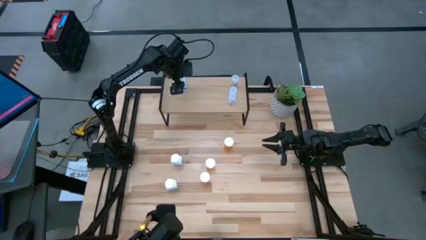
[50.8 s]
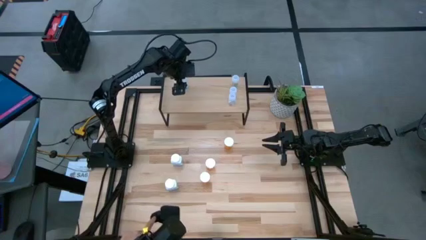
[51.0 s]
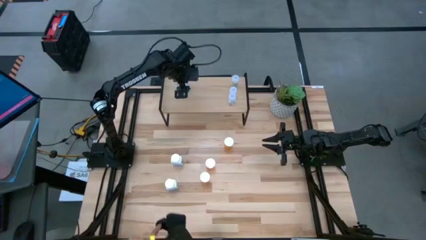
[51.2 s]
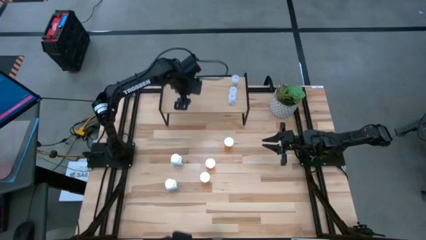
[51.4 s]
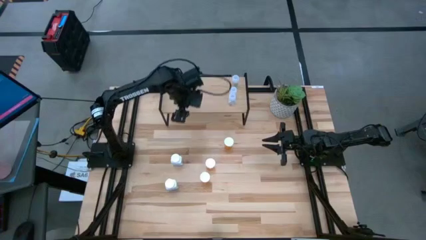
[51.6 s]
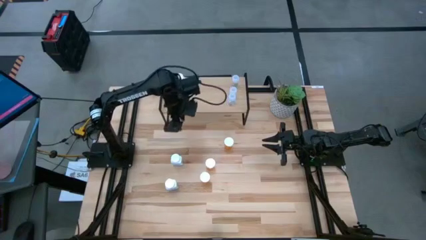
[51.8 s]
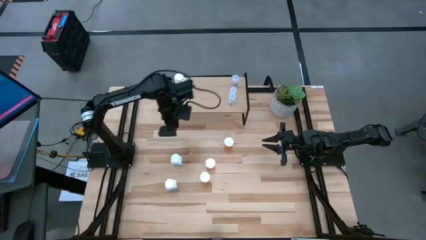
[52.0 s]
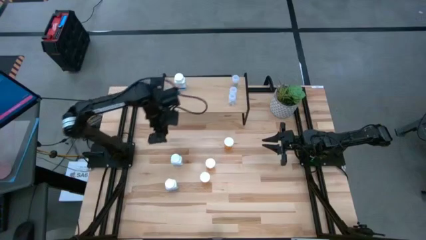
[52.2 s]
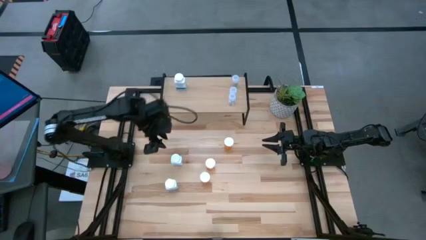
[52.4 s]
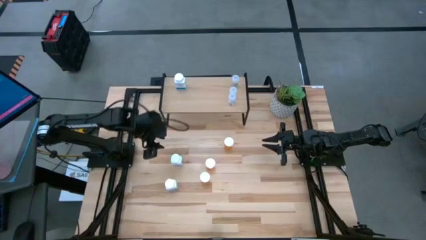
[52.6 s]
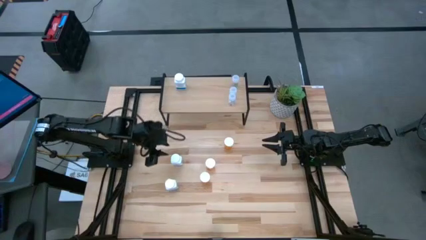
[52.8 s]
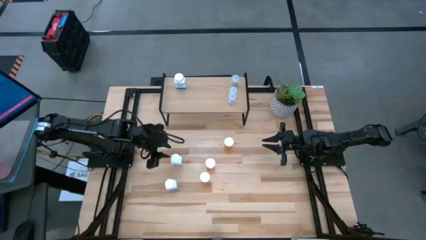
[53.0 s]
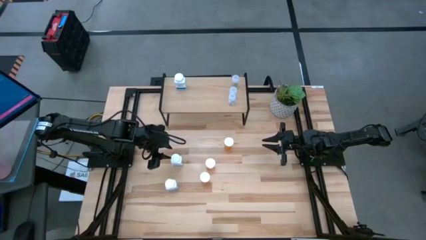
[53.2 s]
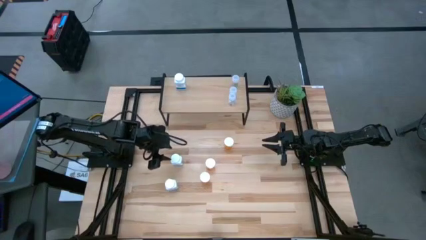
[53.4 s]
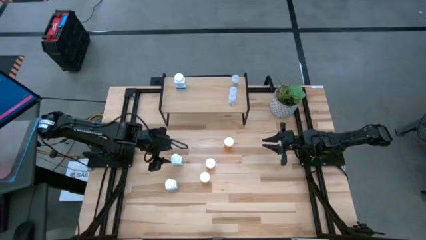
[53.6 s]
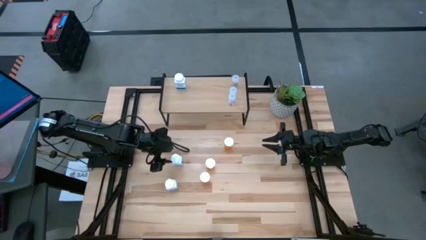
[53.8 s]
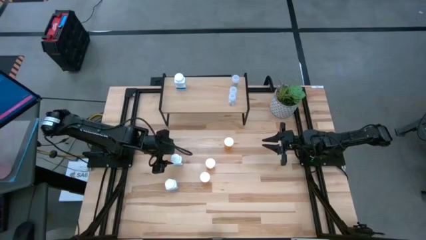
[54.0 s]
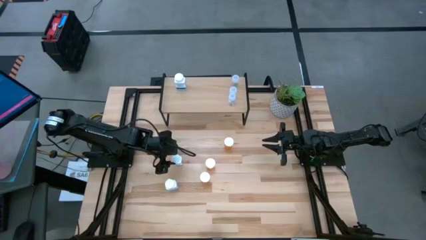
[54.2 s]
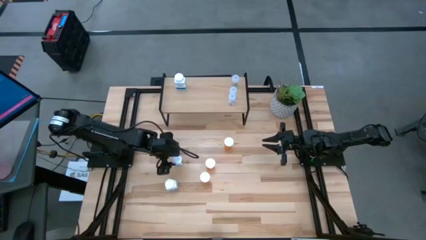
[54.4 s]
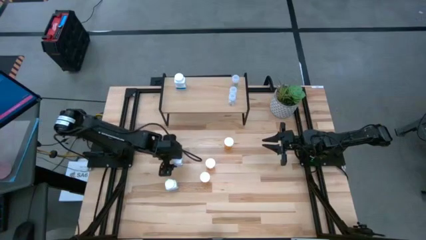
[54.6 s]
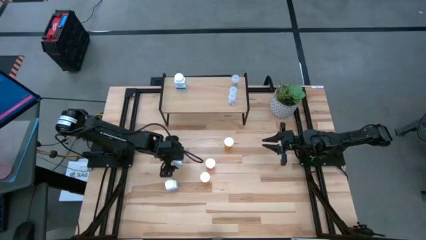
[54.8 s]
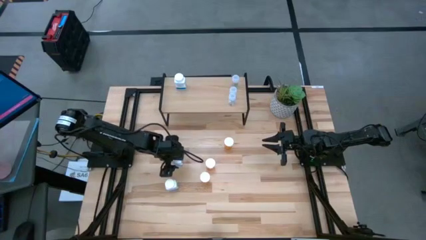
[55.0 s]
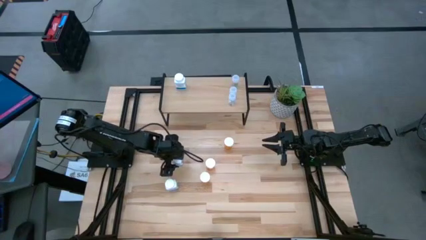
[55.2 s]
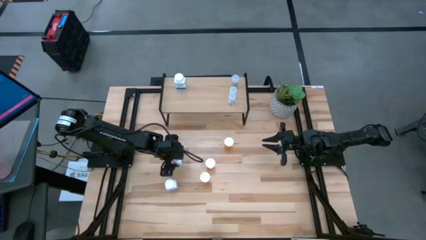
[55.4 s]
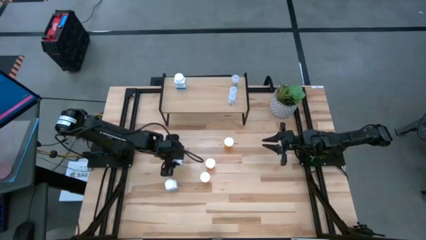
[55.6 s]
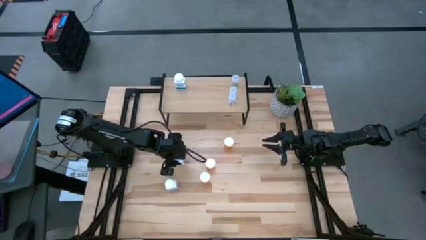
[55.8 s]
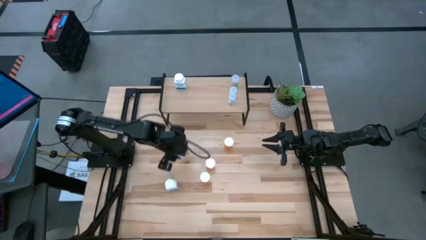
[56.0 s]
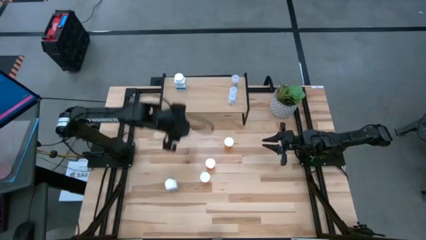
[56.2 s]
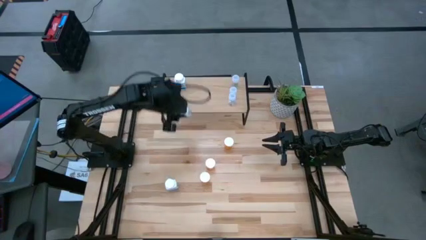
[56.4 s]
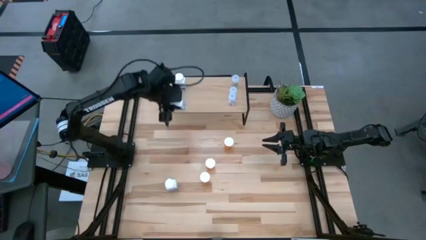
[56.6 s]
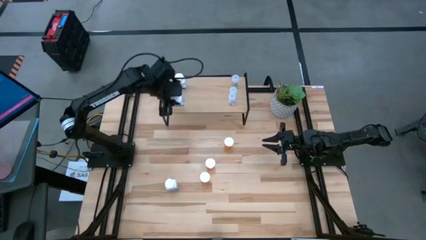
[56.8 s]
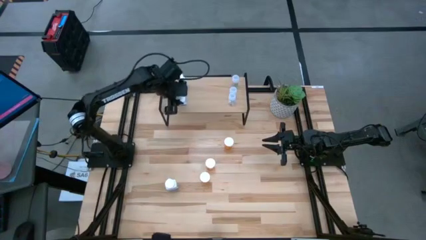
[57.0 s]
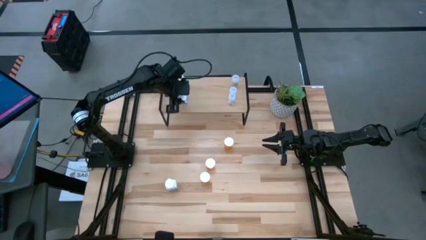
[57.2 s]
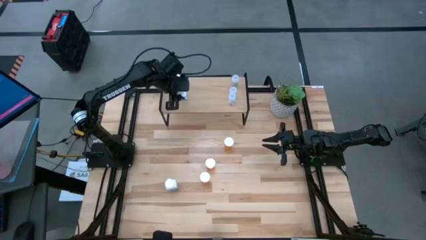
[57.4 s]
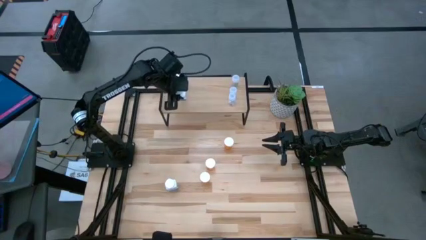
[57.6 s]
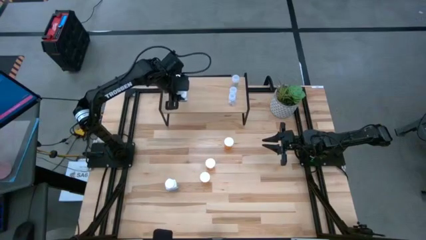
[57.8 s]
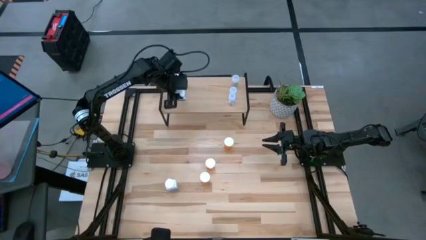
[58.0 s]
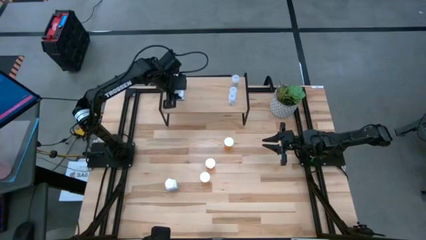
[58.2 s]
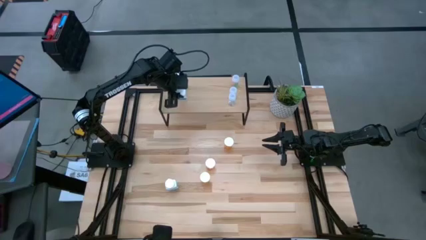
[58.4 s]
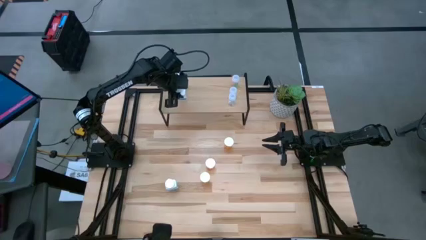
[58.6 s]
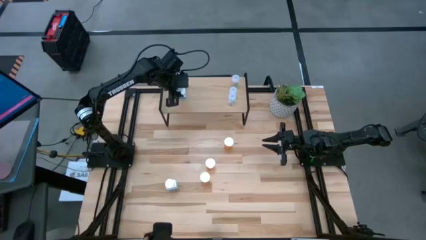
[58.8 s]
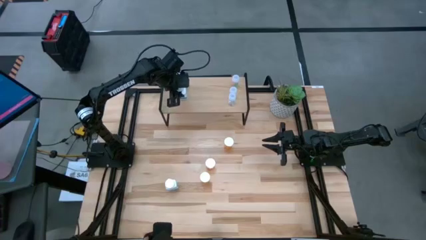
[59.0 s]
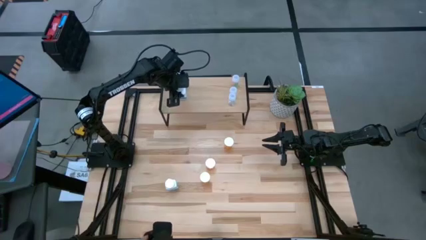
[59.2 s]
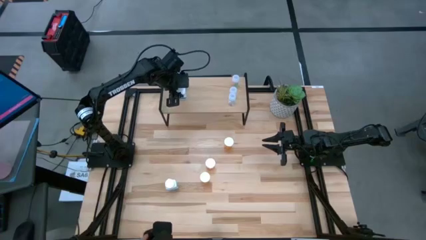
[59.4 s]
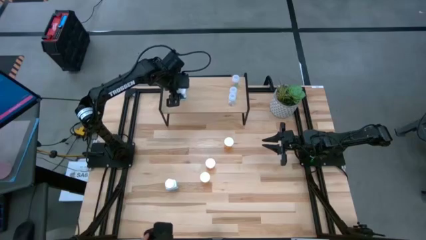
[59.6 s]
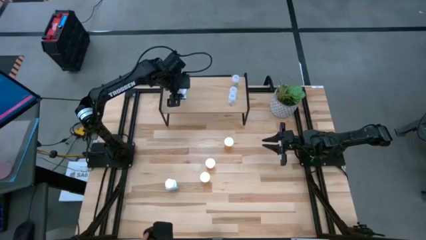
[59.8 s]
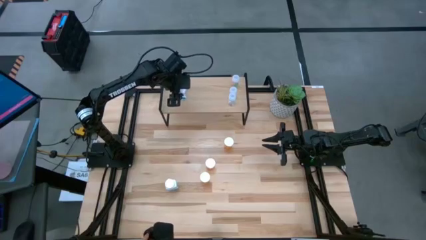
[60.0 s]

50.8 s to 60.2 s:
Task: Pick and place medicine bottles onto shelf by color
Put the top white pill bottle aligned with the other white pill bottle on the shelf

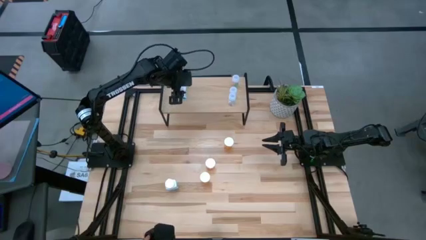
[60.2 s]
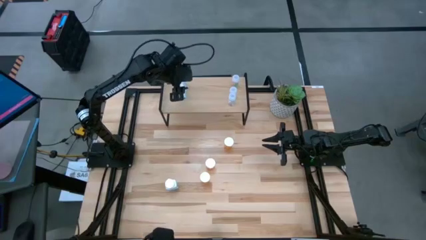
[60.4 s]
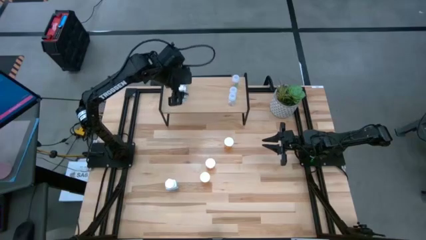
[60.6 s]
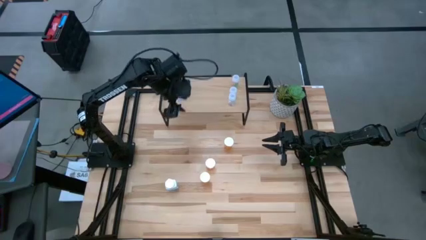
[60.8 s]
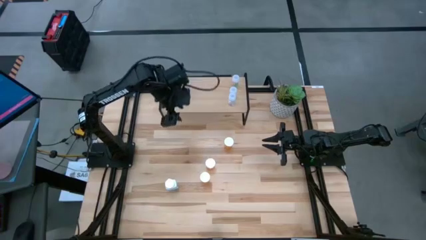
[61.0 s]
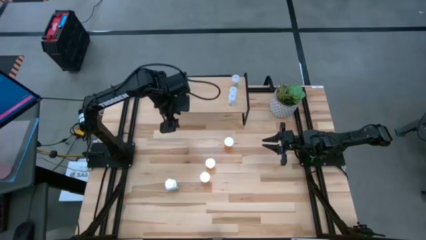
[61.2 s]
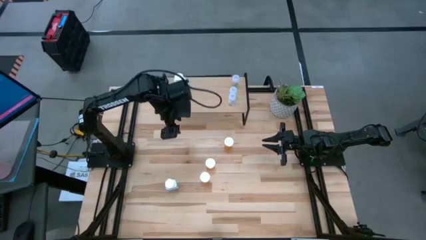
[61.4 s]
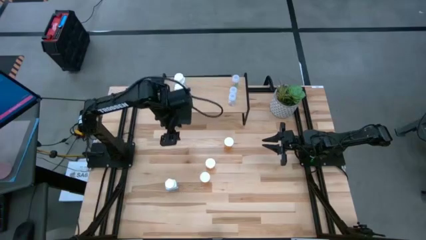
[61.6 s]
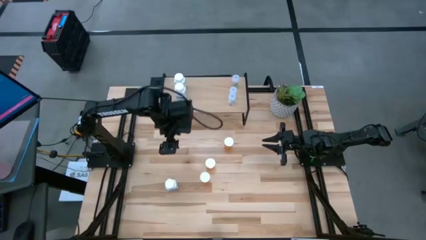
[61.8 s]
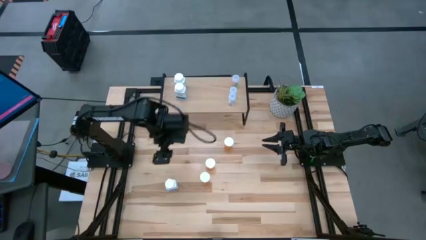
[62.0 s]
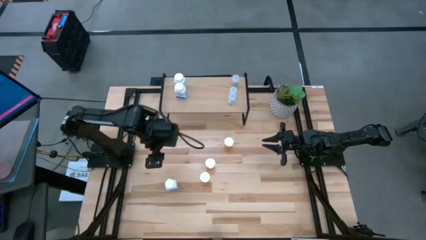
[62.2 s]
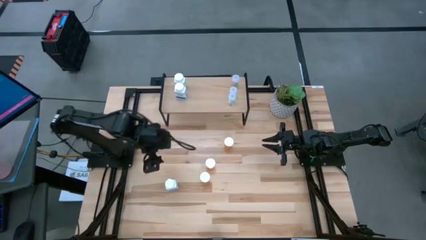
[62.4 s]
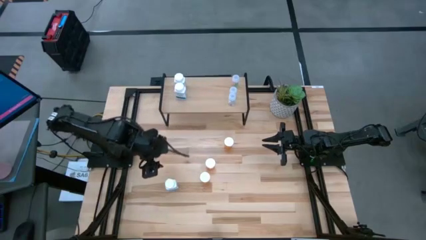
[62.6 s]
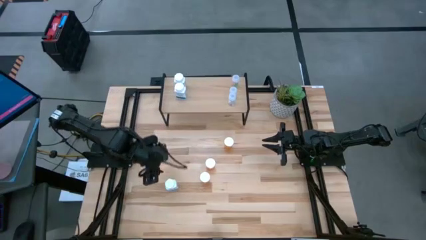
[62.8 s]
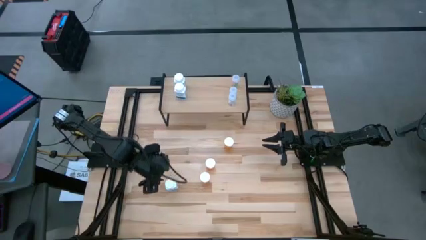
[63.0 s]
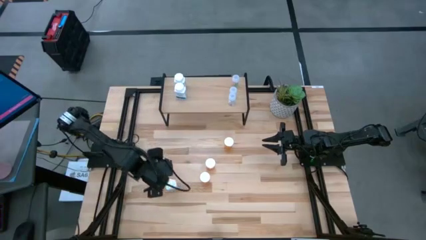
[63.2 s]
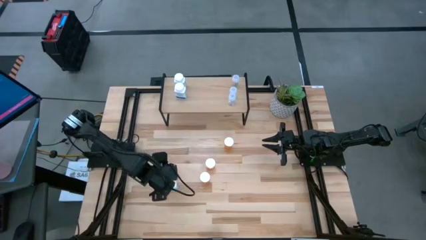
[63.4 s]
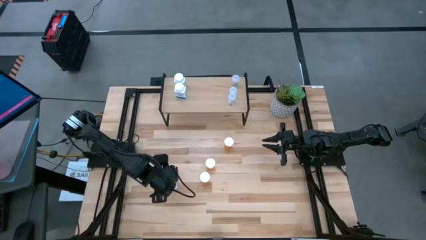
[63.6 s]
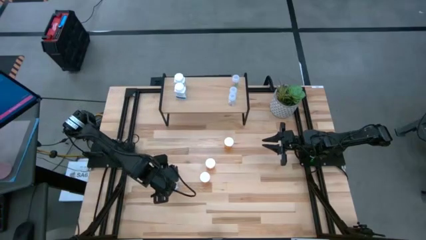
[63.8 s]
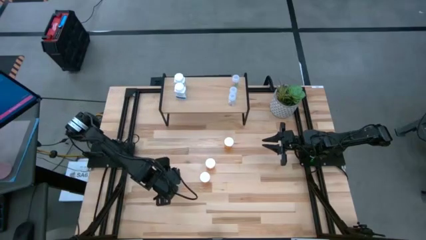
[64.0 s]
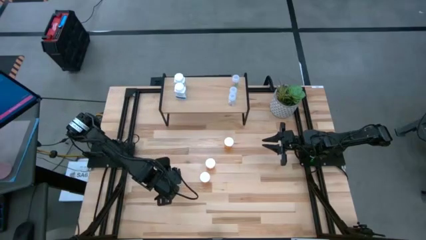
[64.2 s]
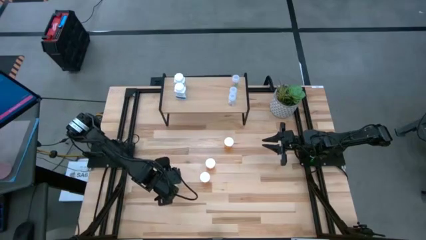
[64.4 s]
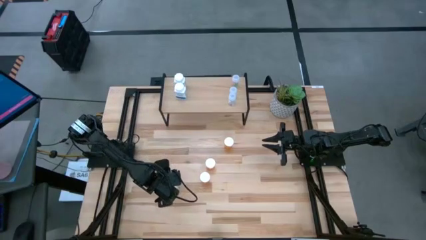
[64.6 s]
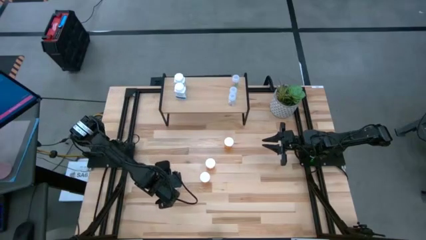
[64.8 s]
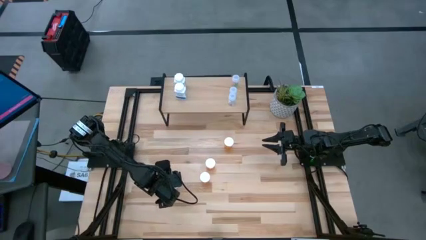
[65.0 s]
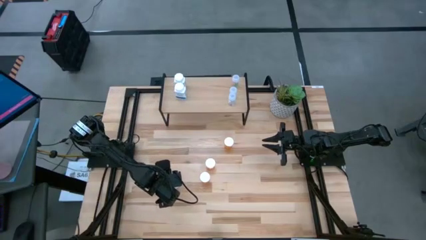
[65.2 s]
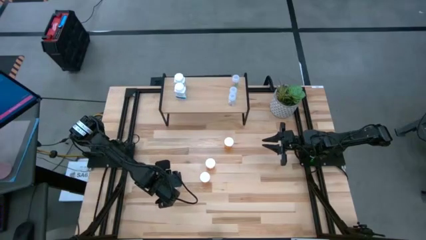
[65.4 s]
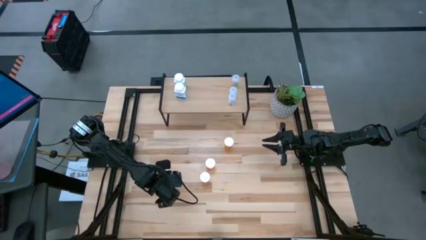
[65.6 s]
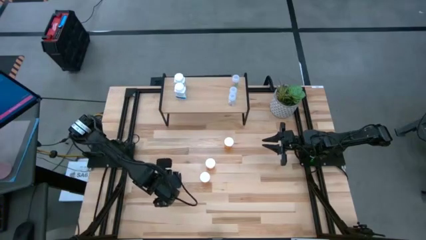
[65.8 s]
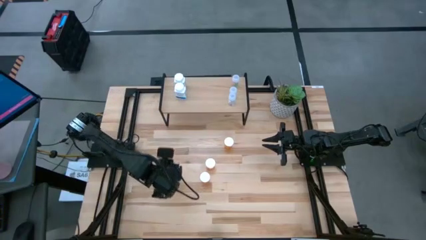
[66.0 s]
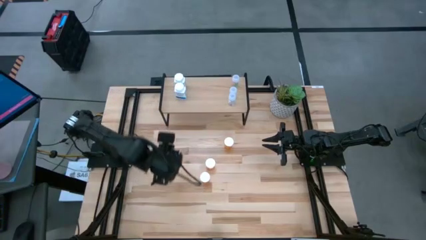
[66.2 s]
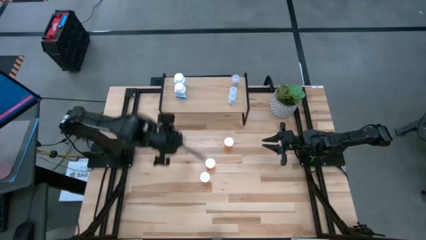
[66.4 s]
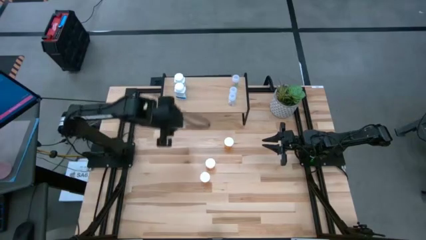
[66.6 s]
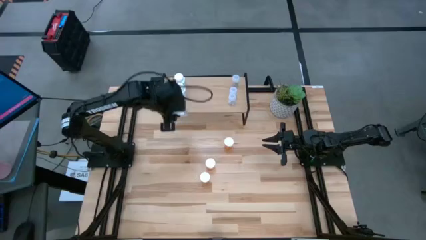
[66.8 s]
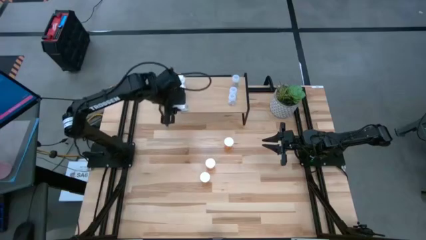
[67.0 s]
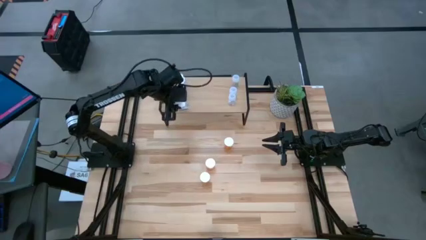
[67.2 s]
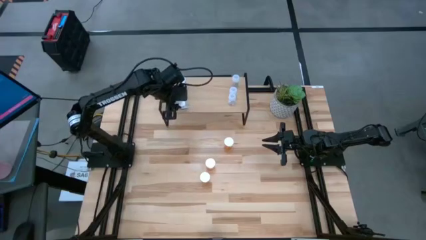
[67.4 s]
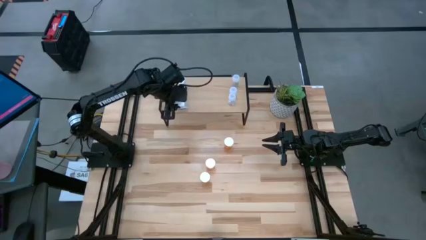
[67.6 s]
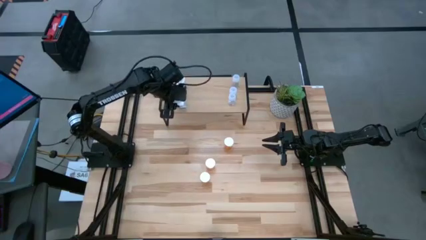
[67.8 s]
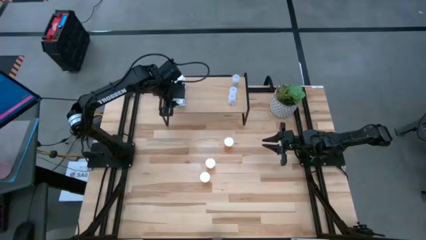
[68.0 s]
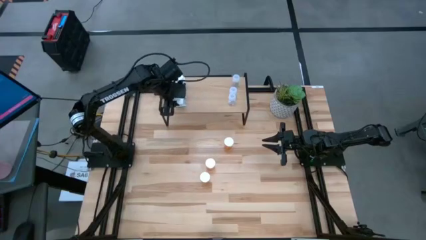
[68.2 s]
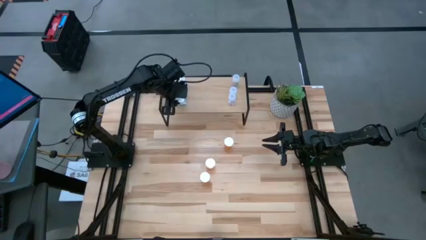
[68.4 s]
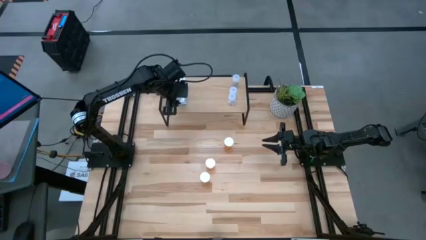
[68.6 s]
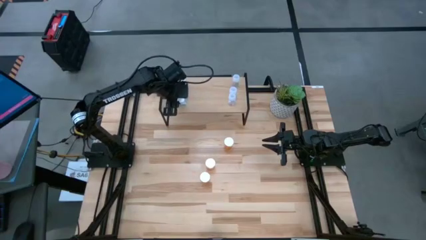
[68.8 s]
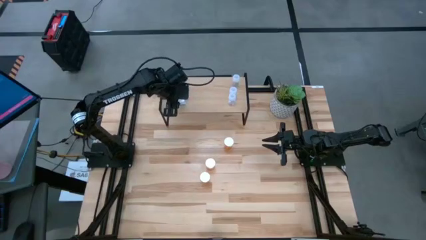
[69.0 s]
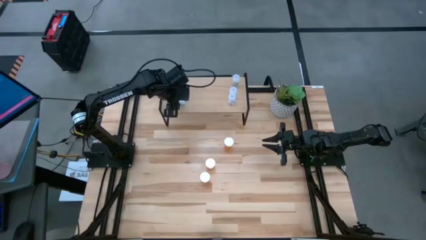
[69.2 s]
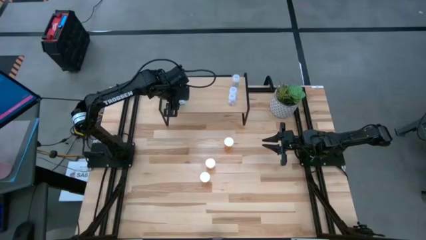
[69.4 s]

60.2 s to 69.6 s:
Put the white pill bottle aligned with the other white pill bottles on the shelf
